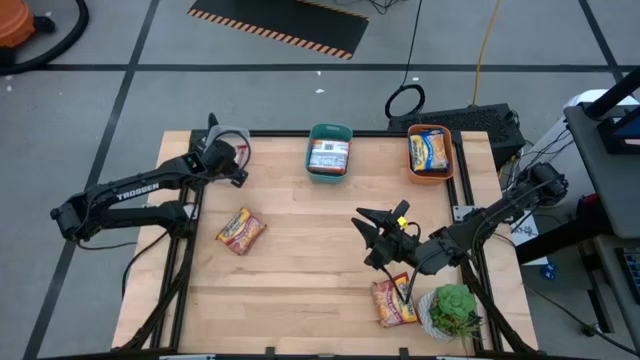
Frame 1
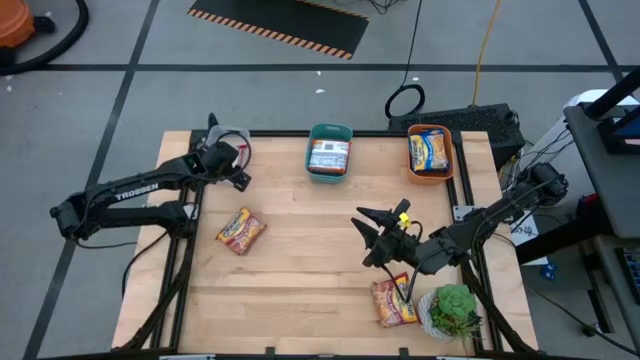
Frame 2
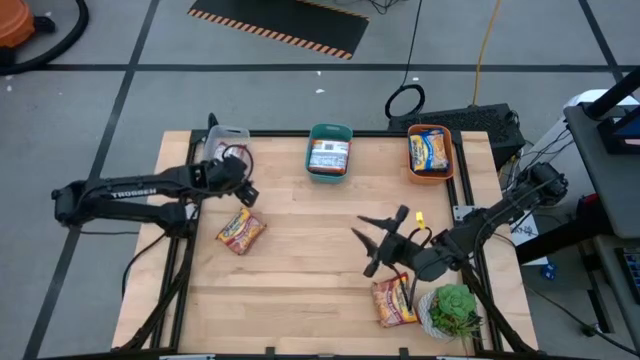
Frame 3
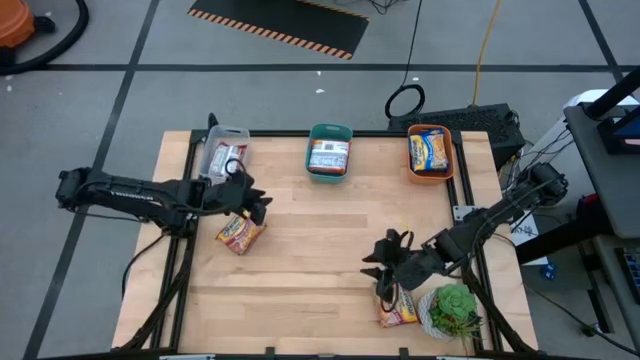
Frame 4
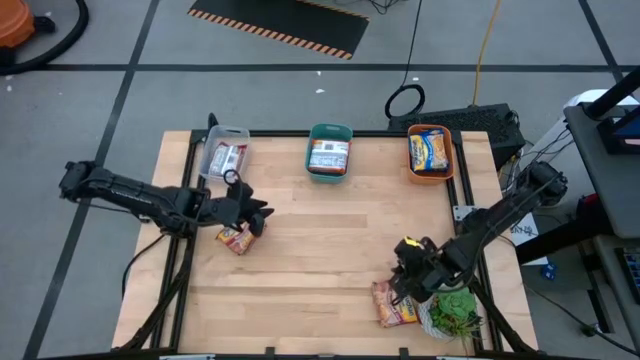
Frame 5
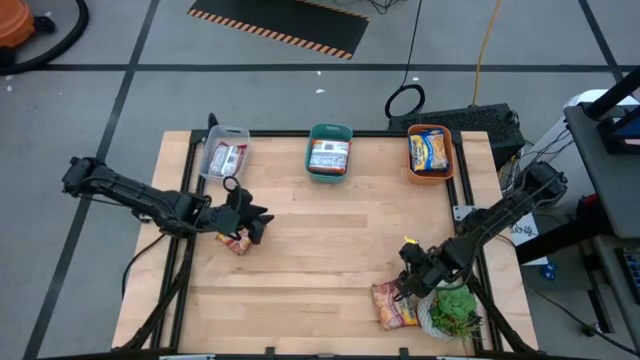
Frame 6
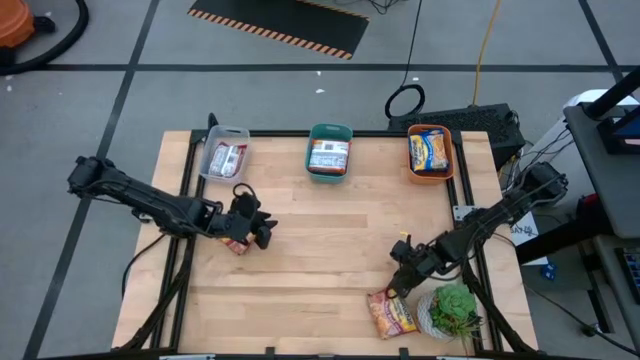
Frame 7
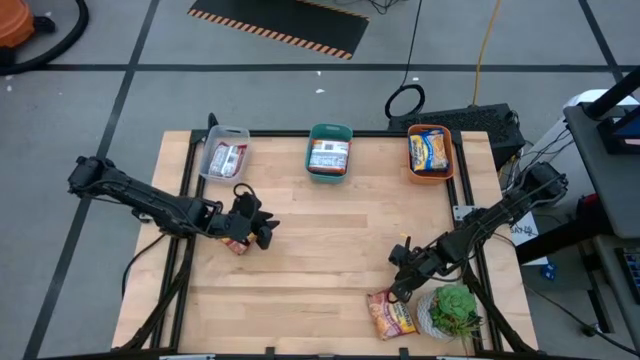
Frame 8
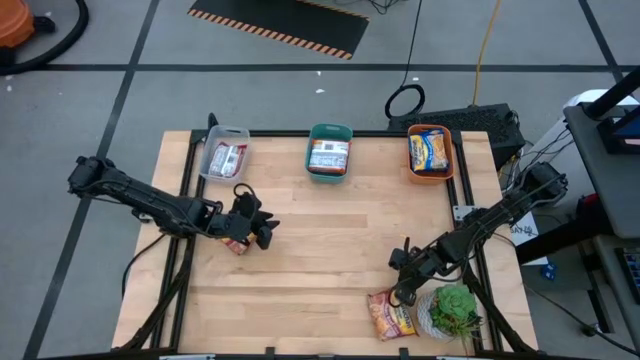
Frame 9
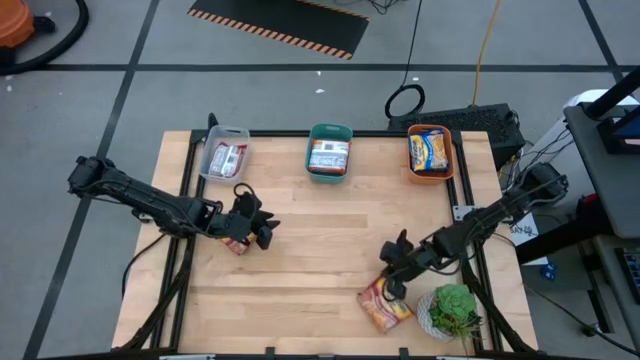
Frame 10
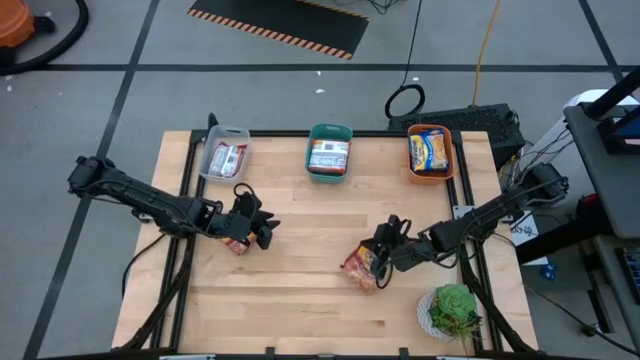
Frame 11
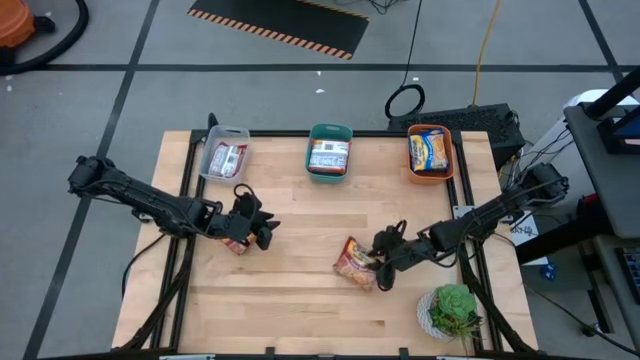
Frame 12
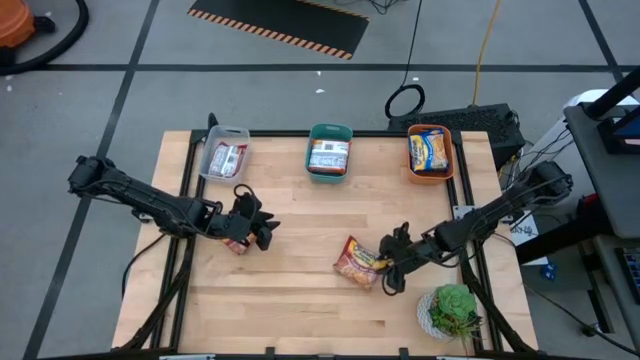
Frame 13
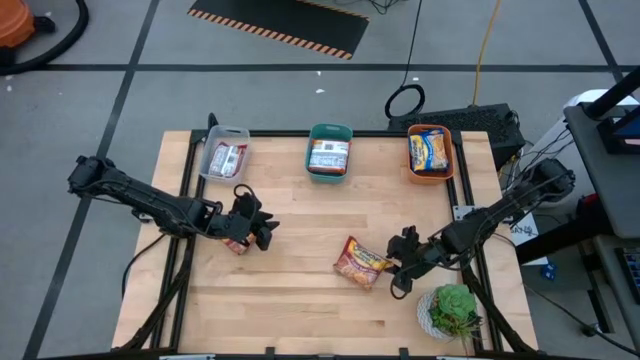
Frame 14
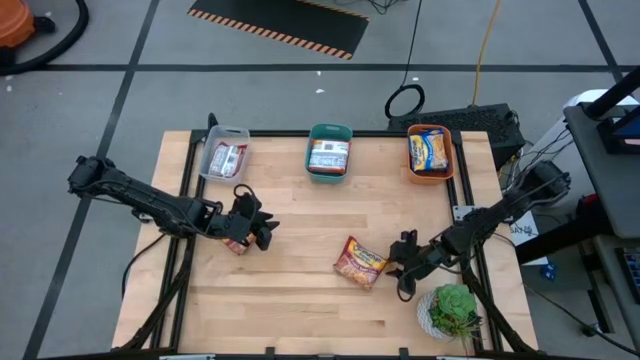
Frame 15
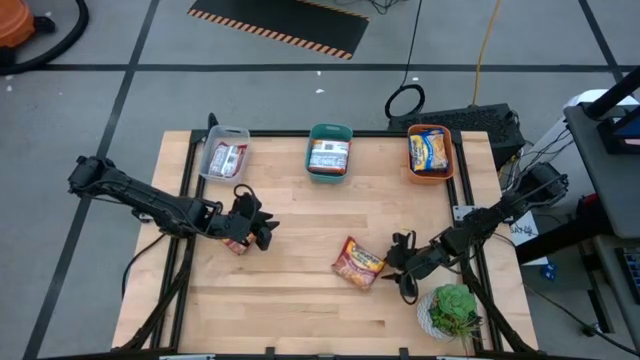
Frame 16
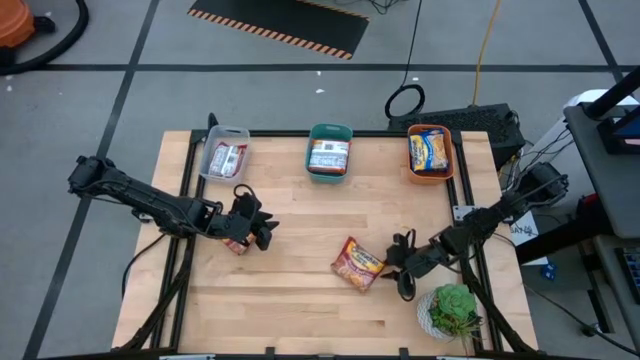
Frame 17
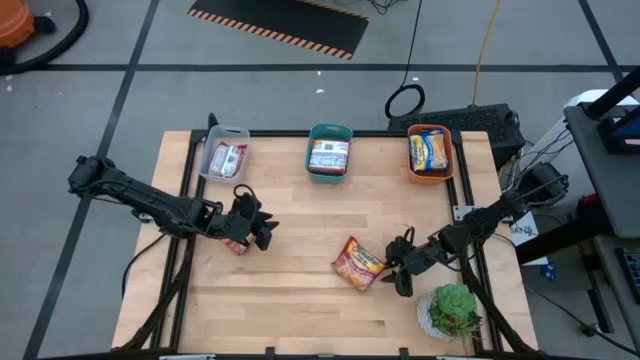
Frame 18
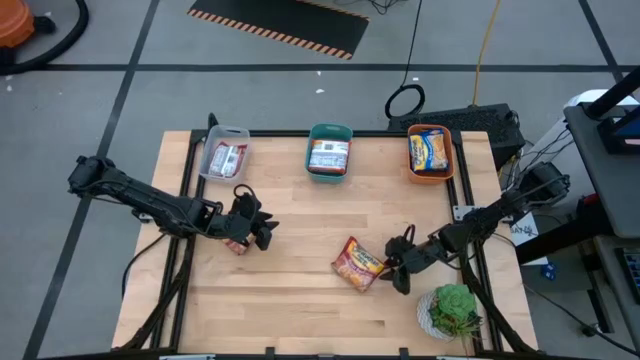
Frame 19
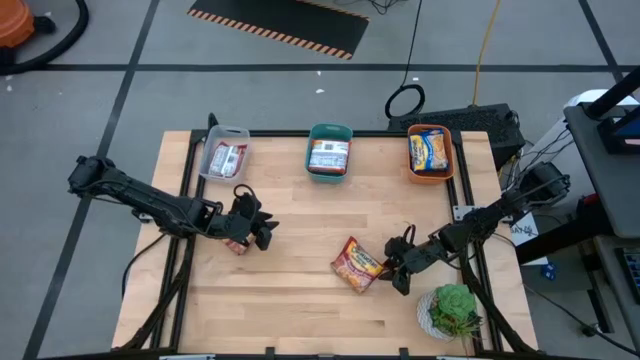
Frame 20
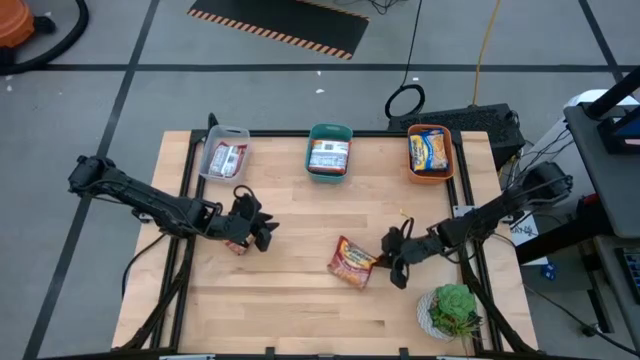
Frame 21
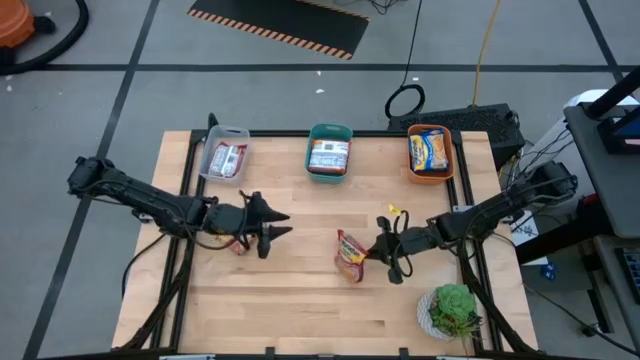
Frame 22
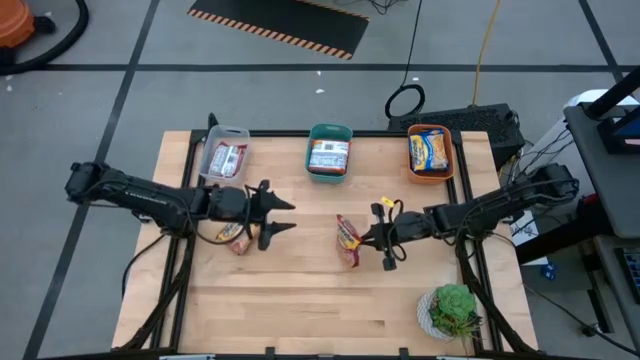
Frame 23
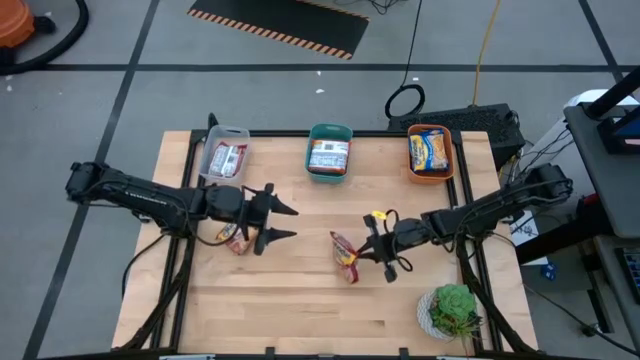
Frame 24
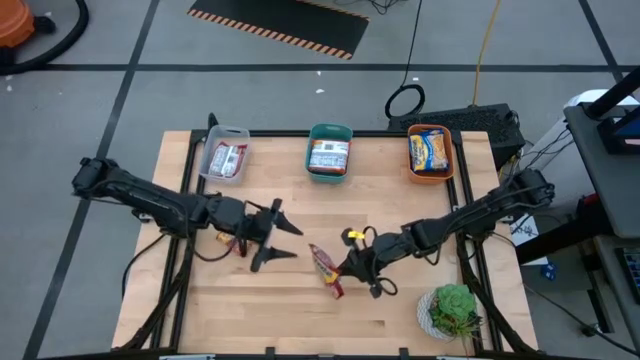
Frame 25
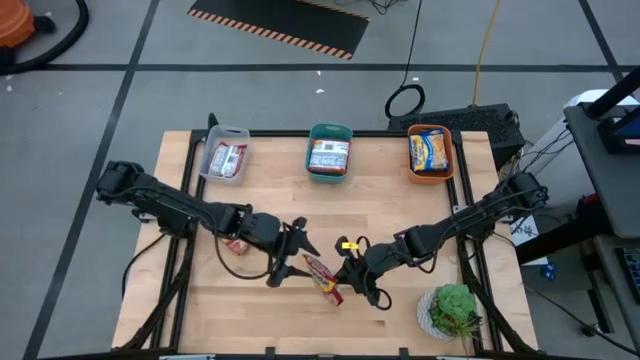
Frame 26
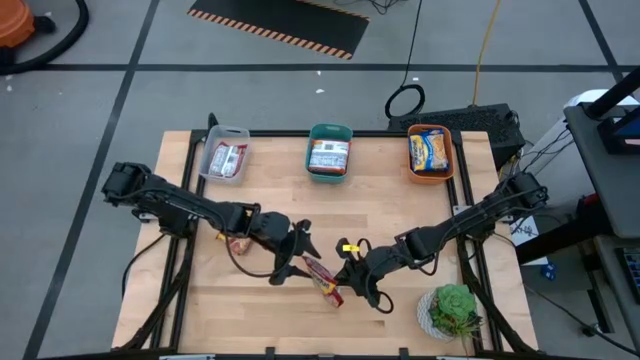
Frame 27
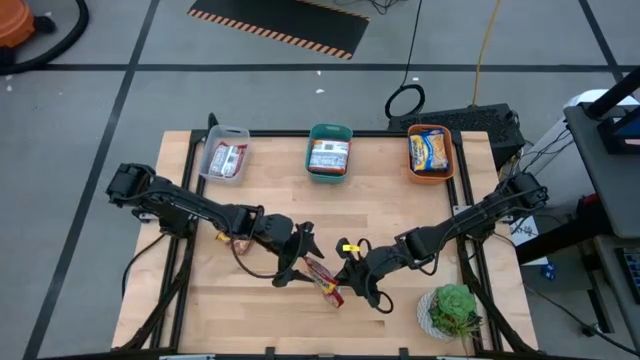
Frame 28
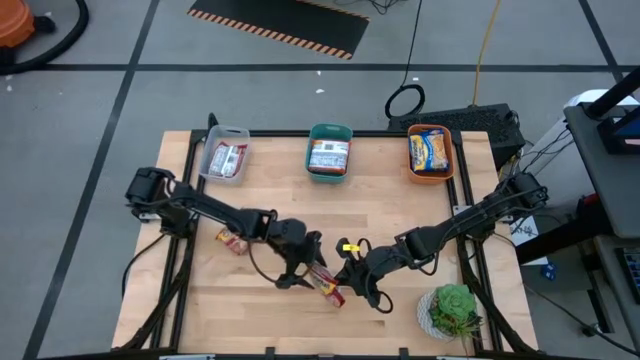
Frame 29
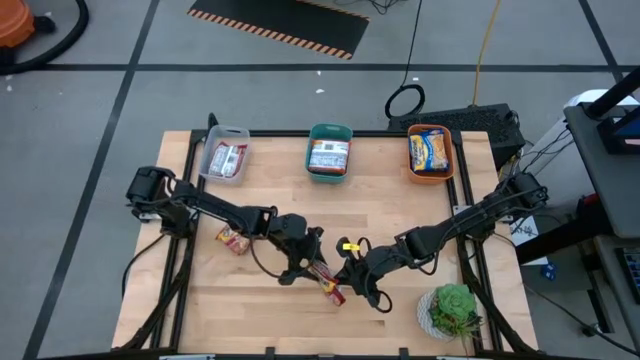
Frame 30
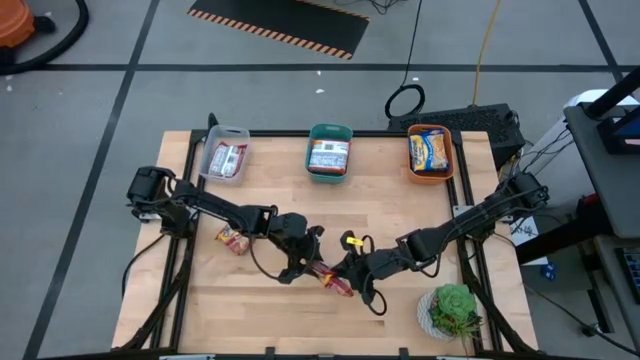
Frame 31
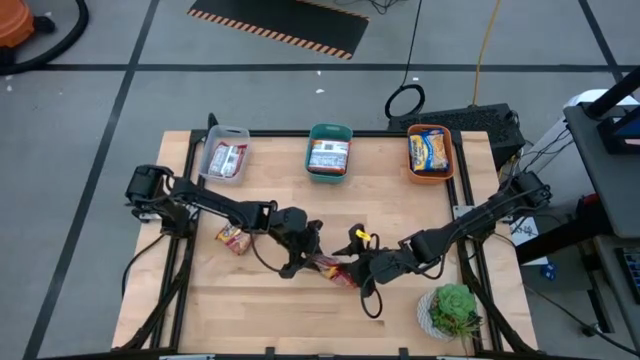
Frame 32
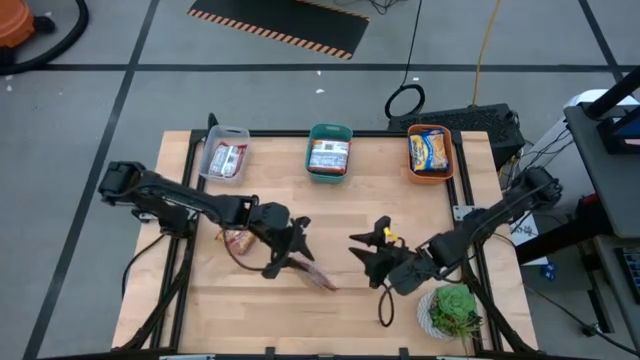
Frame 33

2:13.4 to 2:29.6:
Task: Sort Maruchan noodles
Put the right red noodle pack into the transparent bin

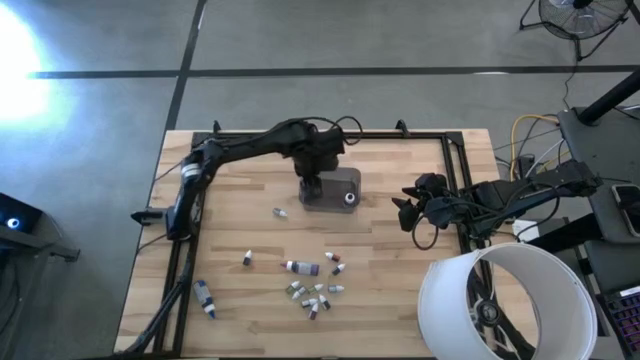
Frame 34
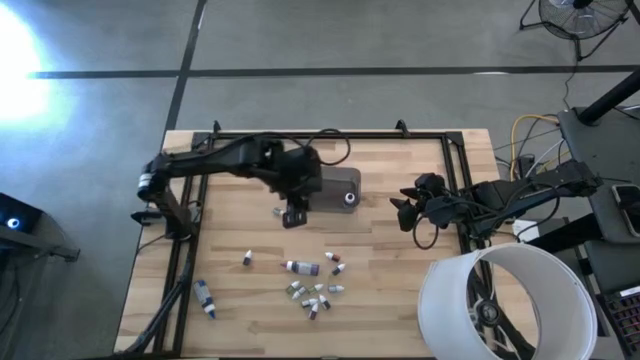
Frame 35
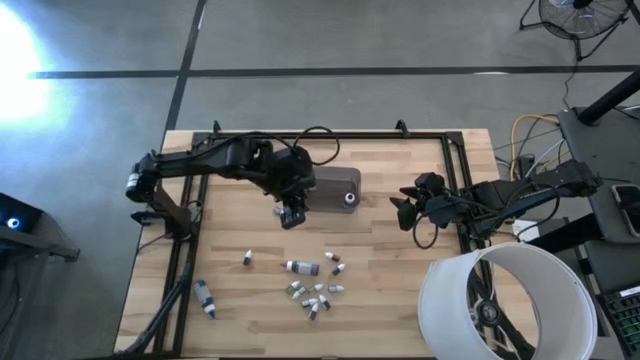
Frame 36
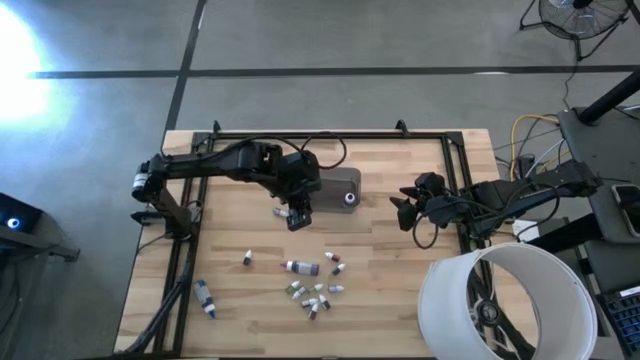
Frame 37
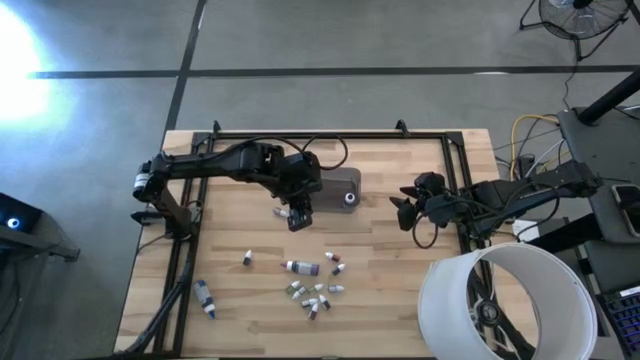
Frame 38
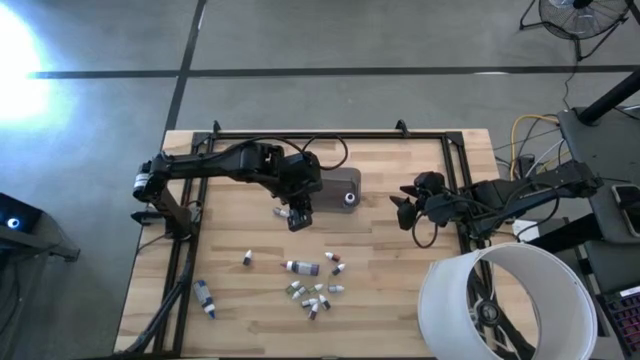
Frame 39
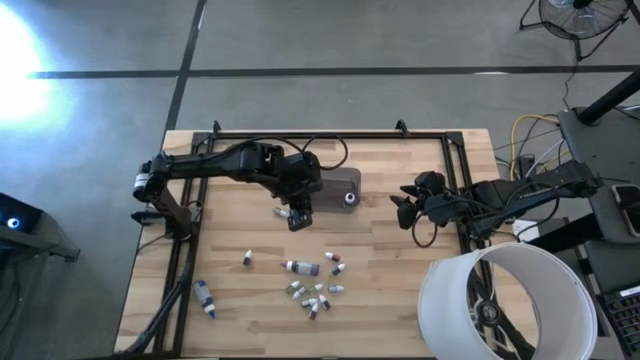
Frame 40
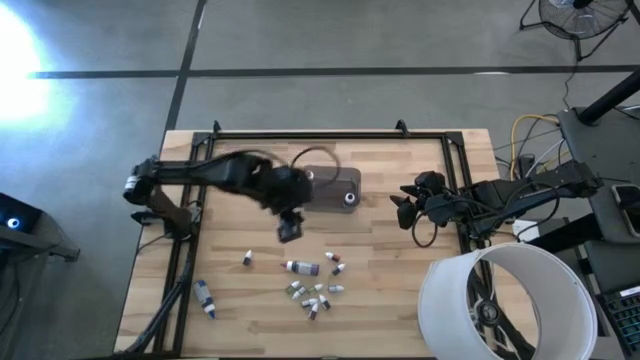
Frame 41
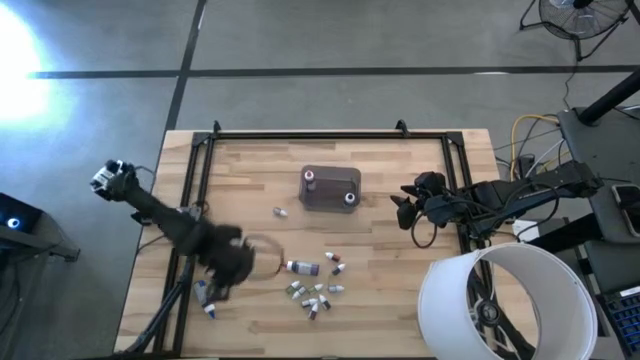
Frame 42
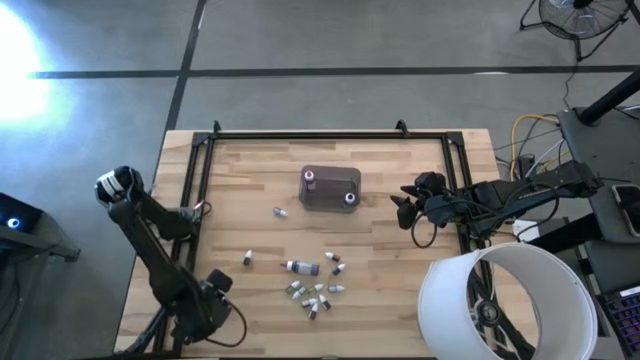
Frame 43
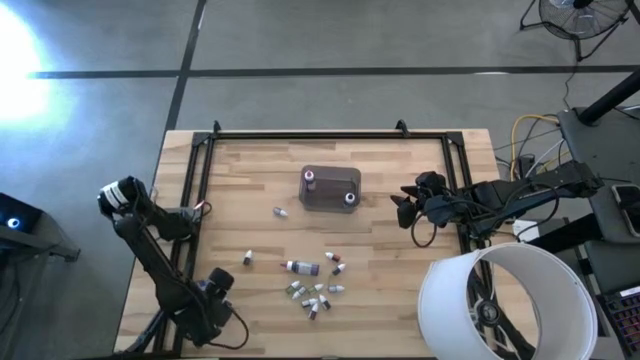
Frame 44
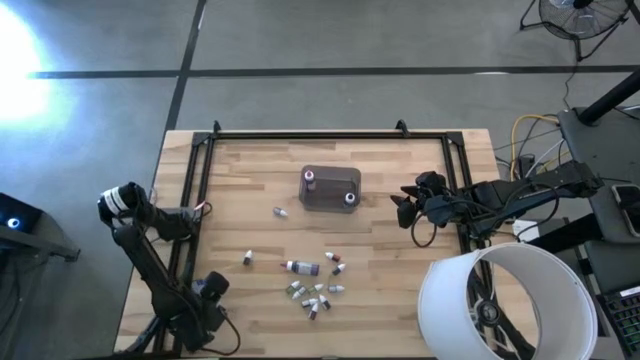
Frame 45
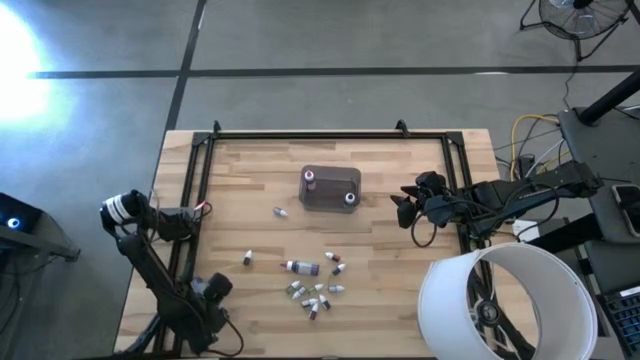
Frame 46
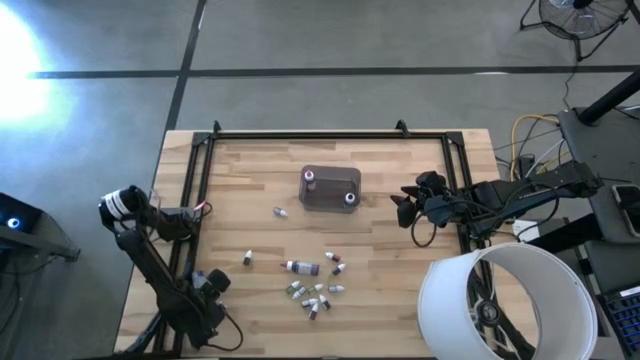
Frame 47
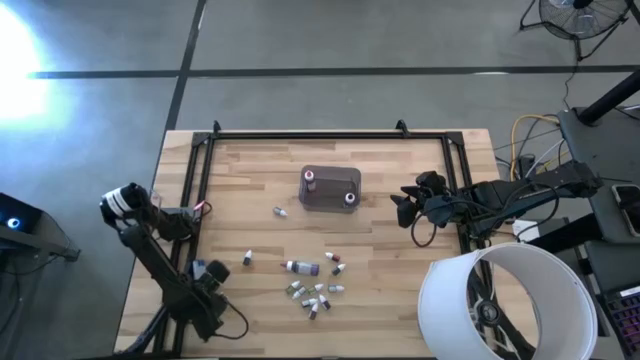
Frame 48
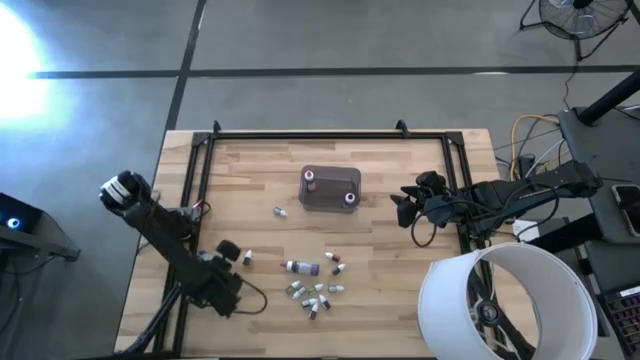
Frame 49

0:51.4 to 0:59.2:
Task: Pick & Place food coloring
Put the large blue food coloring bottle into the black bin
